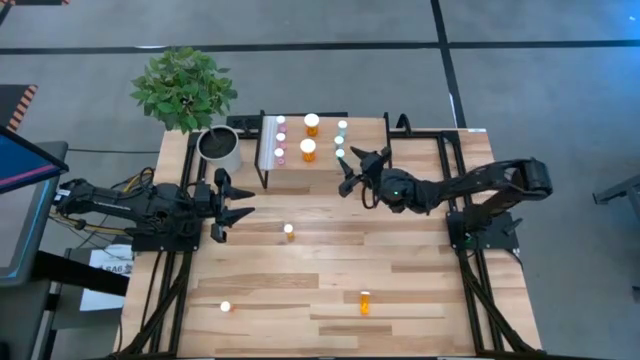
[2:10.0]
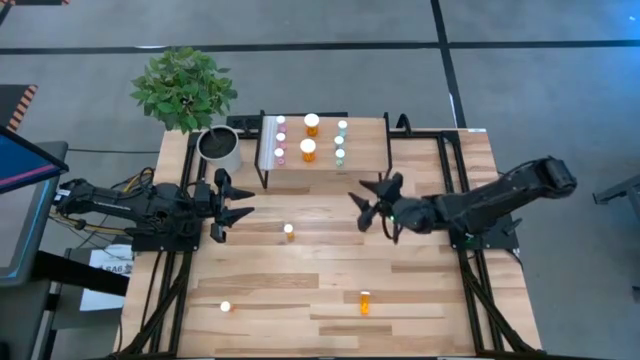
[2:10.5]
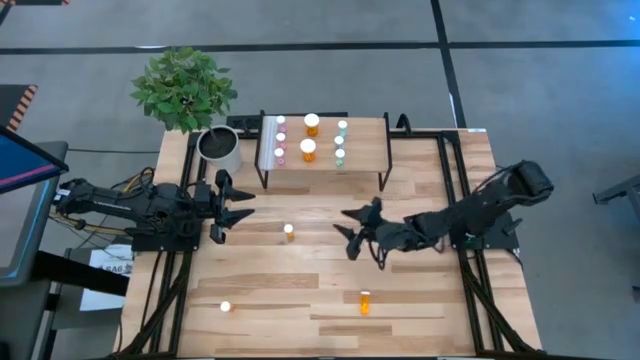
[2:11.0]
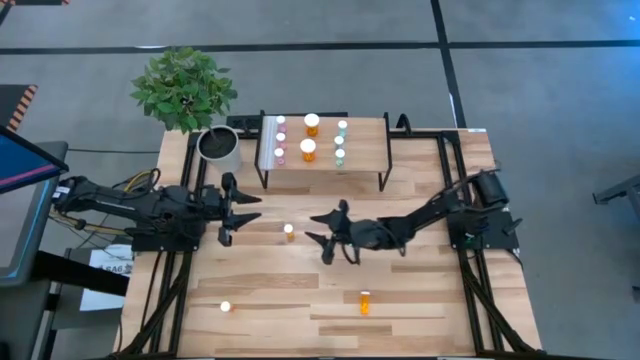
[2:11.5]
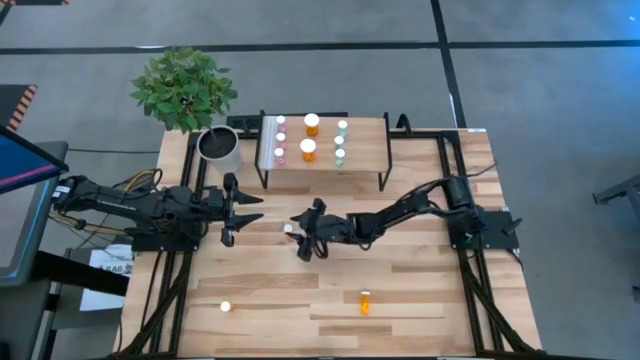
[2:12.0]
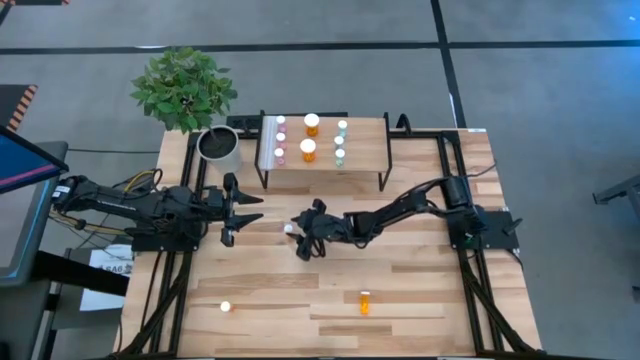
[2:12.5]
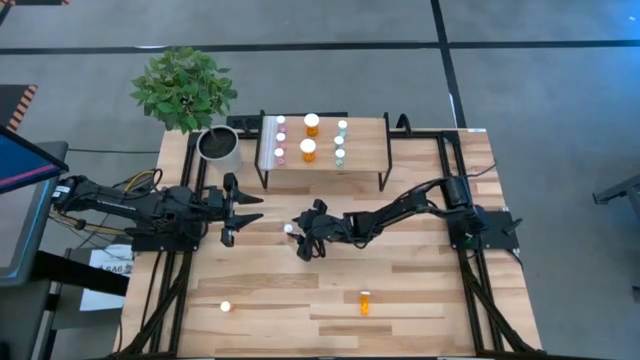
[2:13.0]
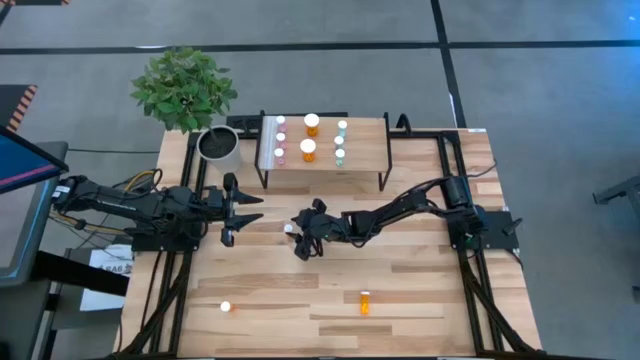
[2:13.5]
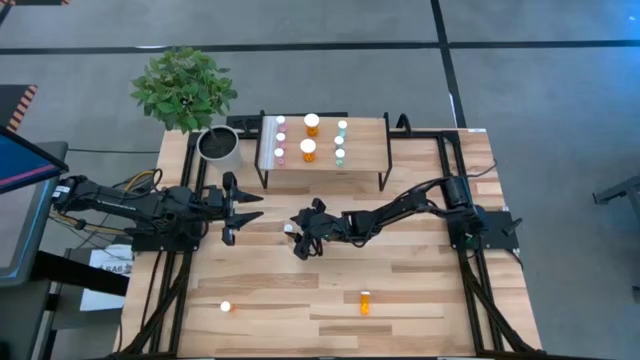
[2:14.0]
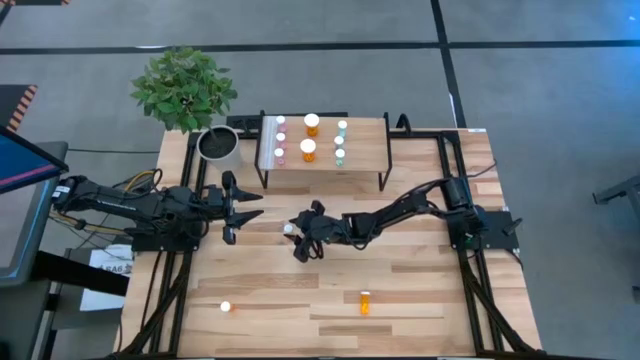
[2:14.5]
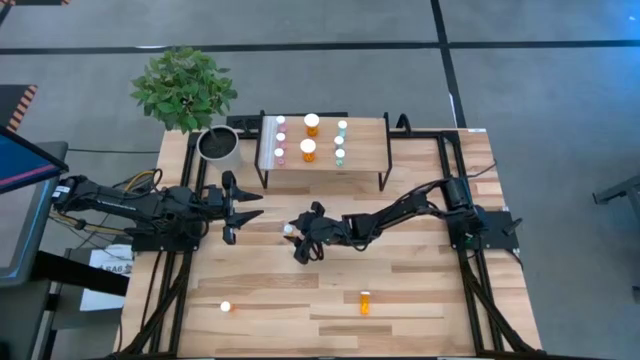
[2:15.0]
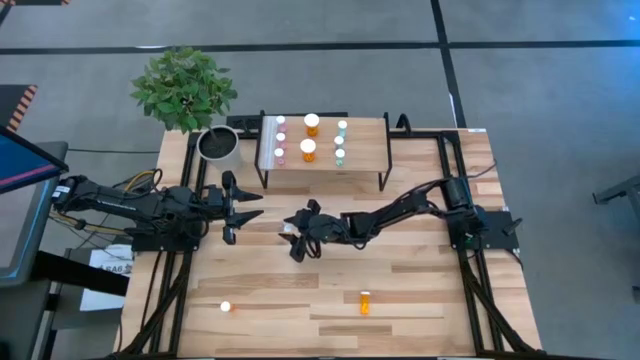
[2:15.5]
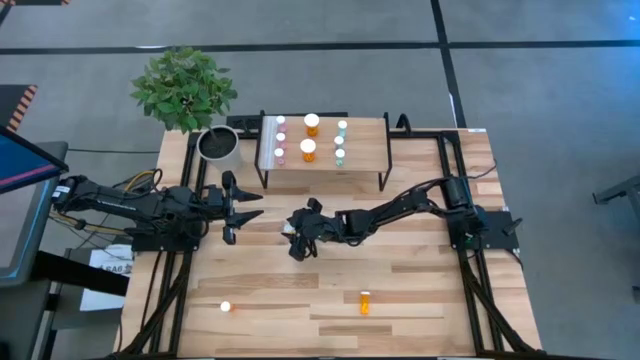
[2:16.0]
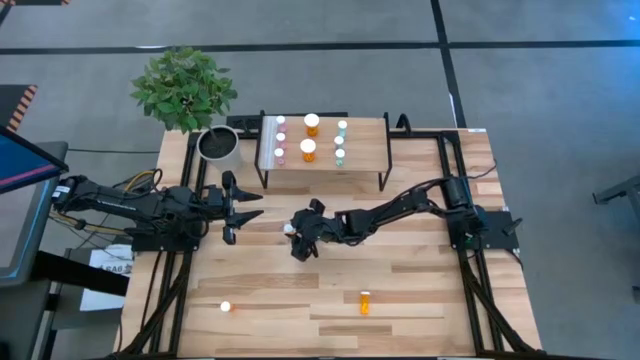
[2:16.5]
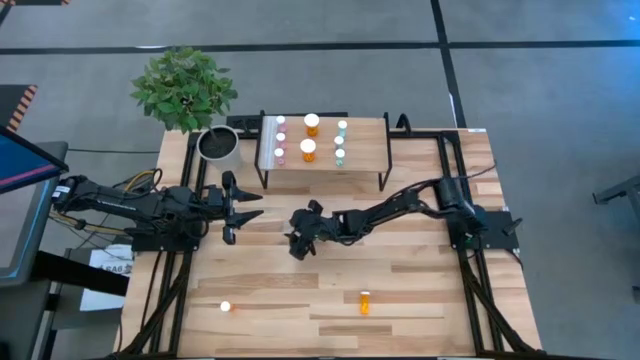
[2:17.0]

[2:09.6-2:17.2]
Task: Pick and place medicine bottles onto shelf by color
Put the top small orange pill bottle on the shelf

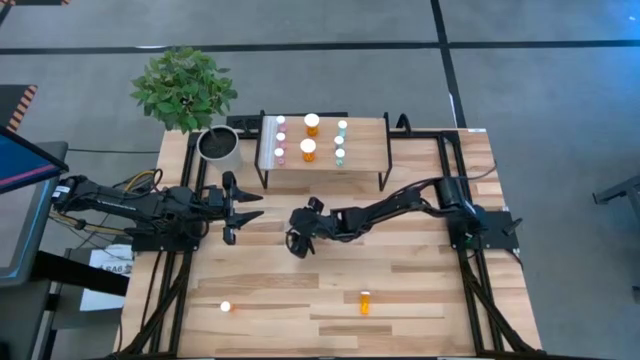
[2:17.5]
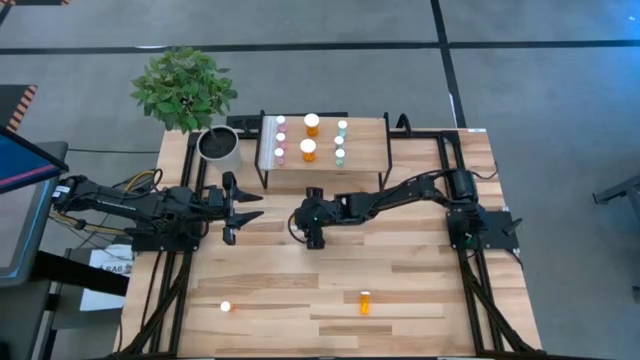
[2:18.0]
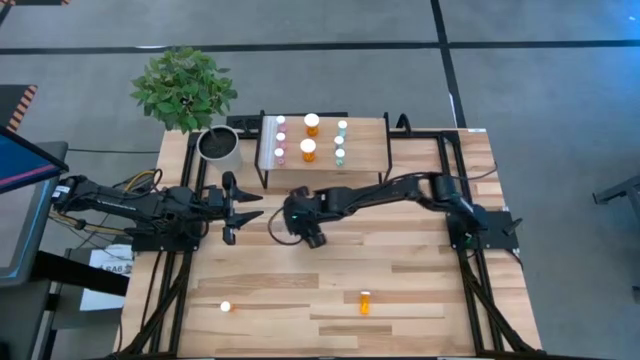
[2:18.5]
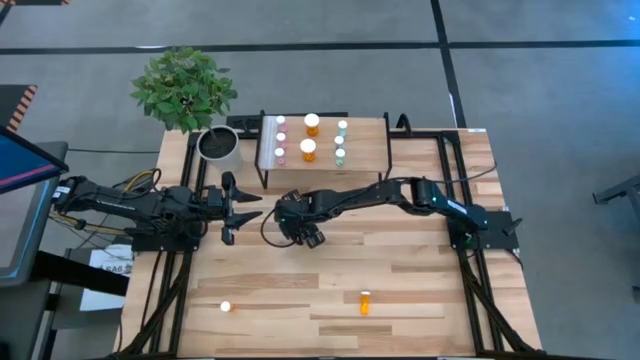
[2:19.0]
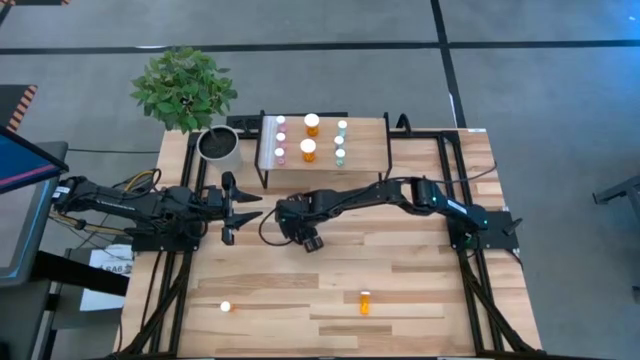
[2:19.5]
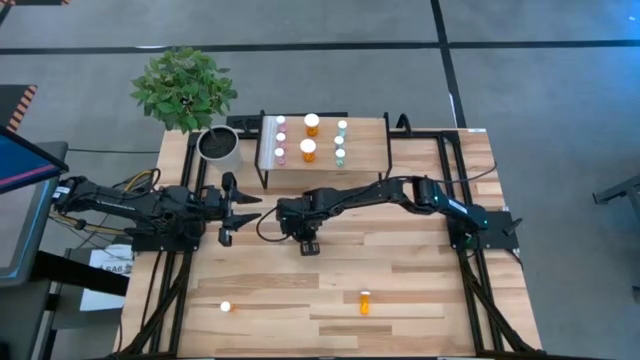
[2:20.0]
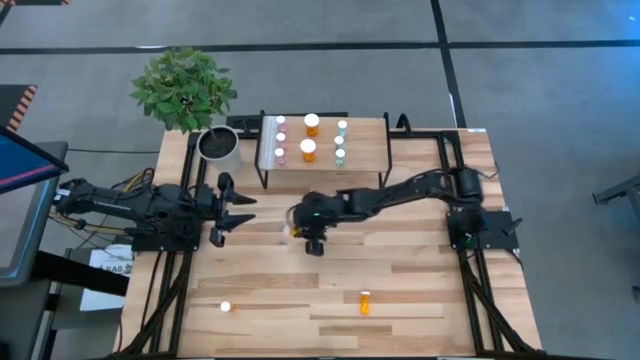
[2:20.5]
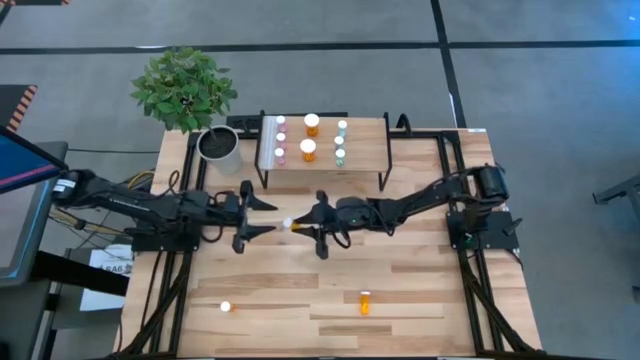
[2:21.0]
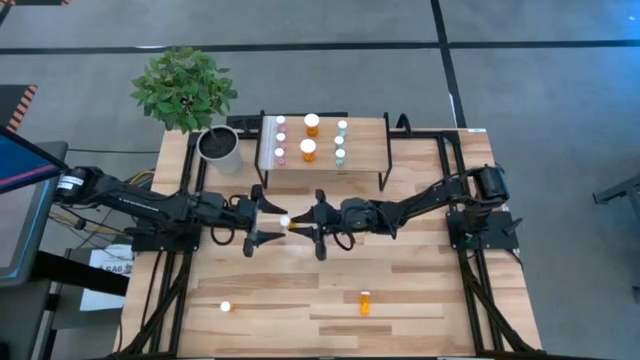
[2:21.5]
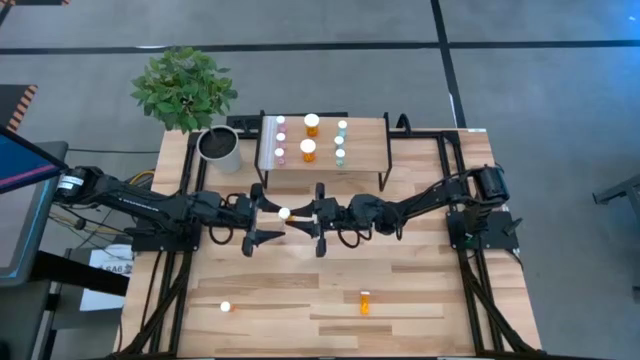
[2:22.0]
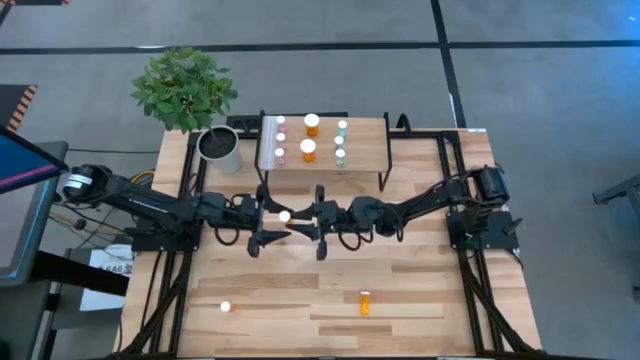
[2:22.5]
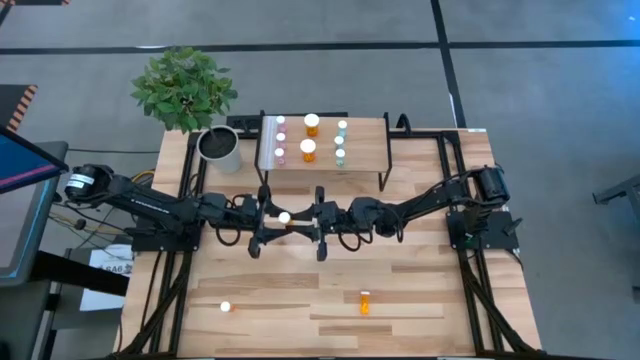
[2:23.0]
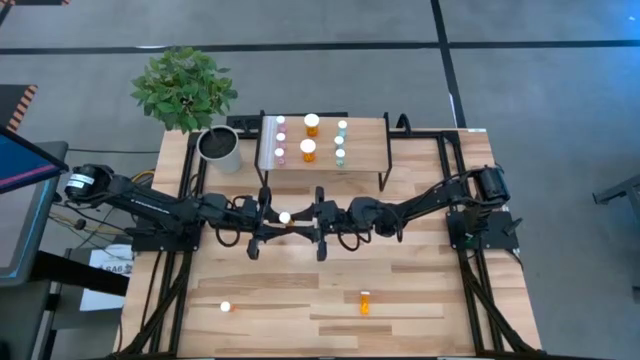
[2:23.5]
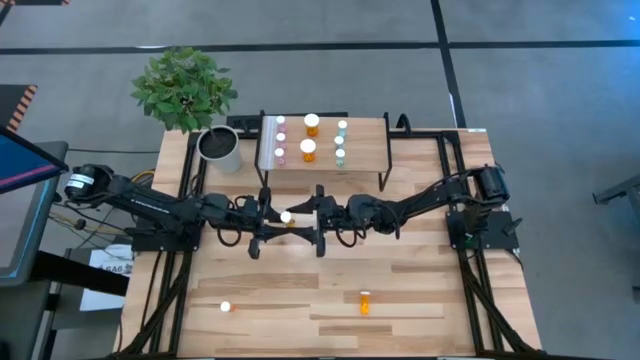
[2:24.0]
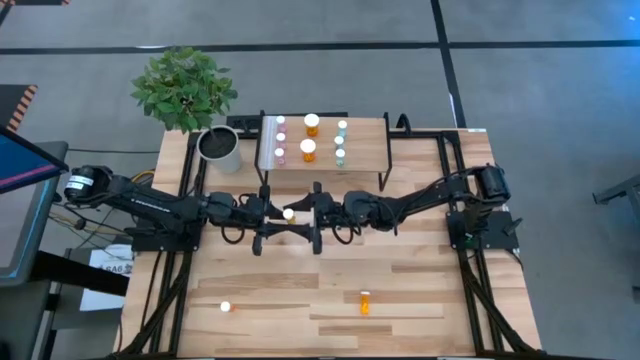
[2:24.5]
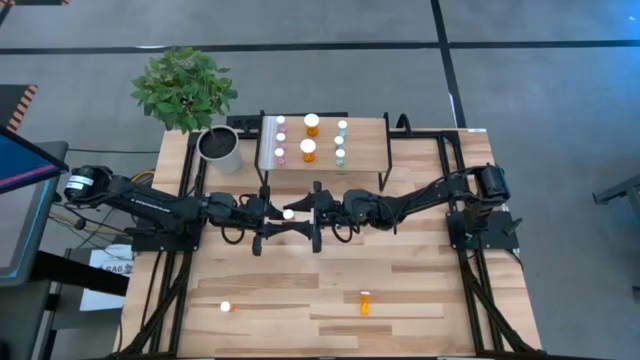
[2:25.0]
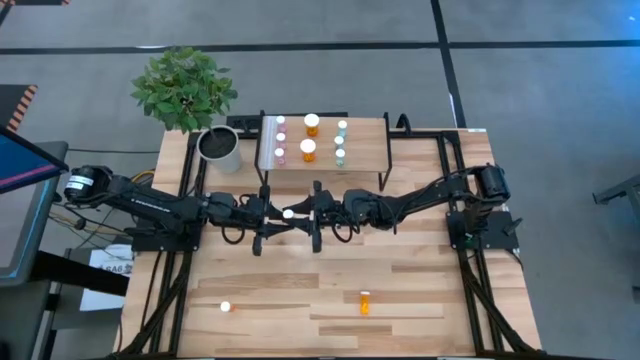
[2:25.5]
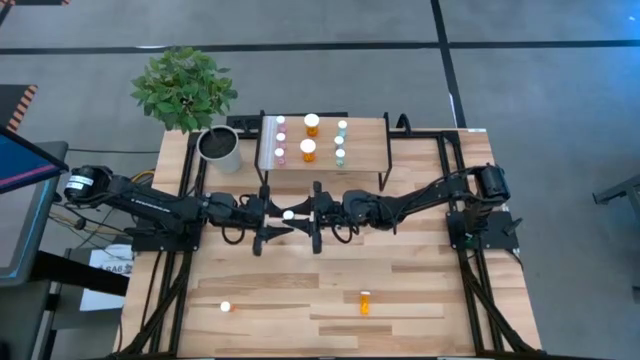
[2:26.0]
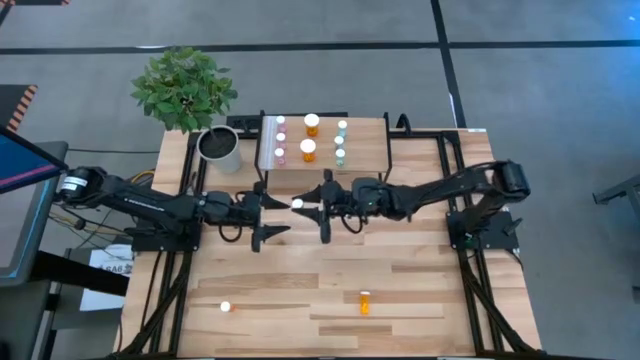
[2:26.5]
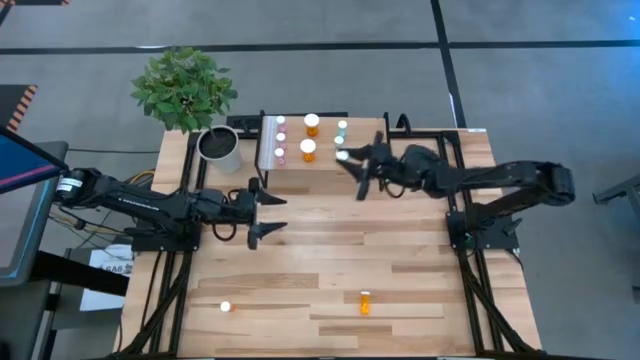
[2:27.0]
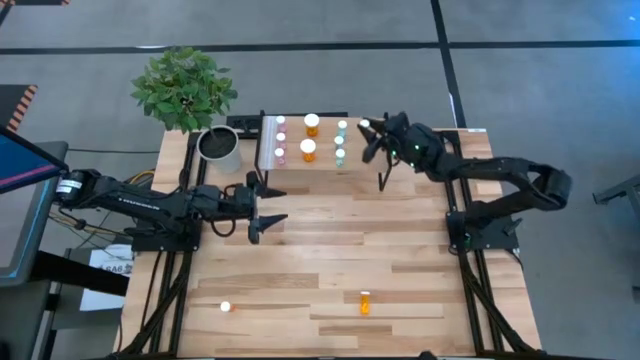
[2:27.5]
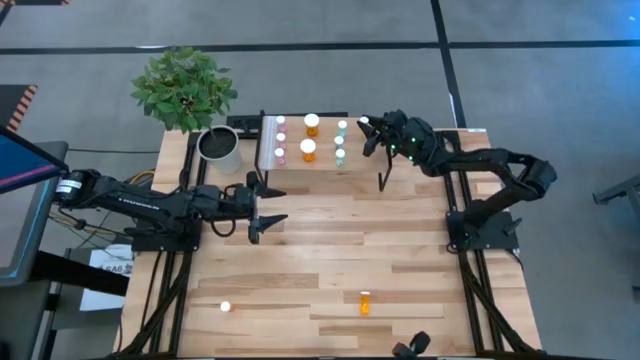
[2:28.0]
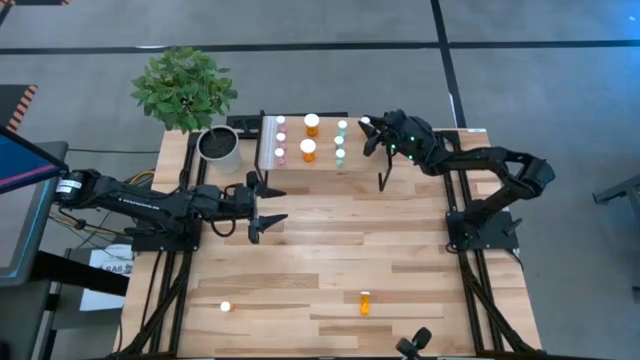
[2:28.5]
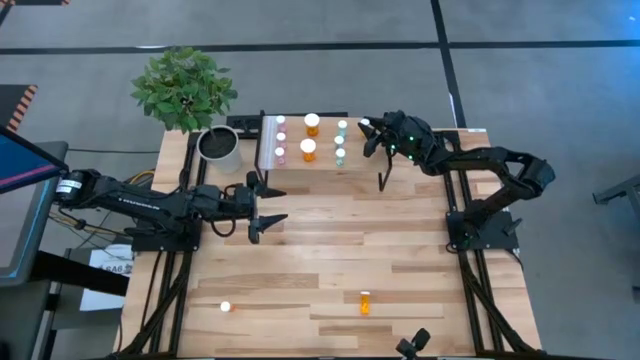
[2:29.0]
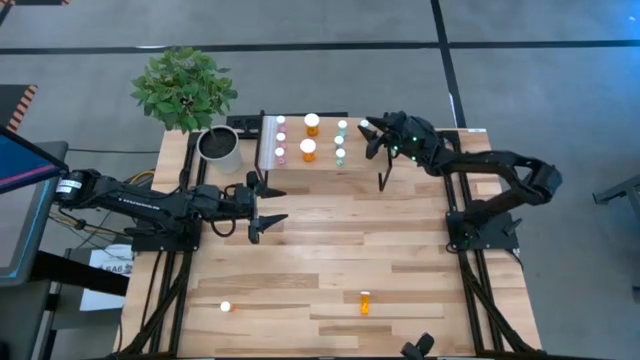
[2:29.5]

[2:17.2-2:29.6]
Put the top small orange pill bottle on the shelf

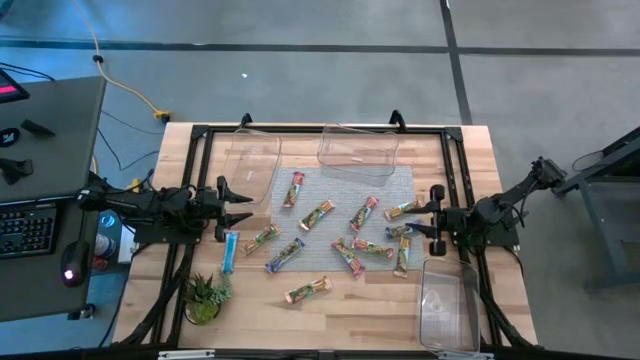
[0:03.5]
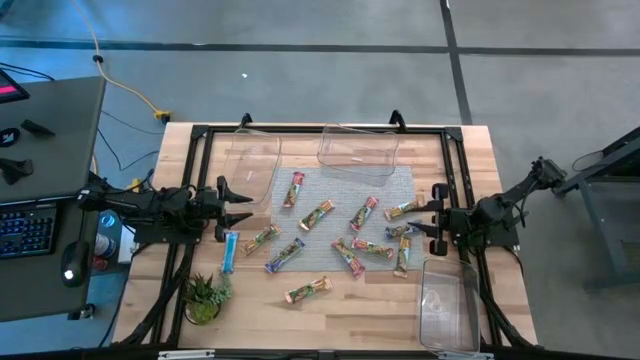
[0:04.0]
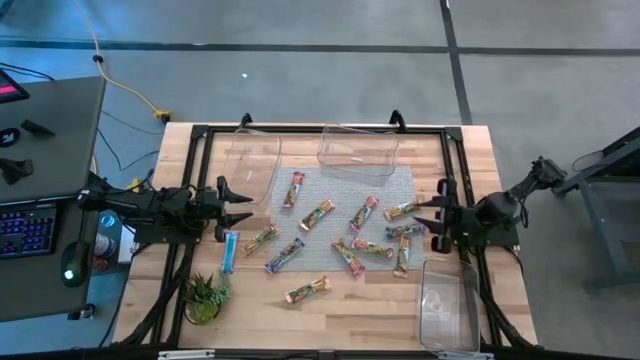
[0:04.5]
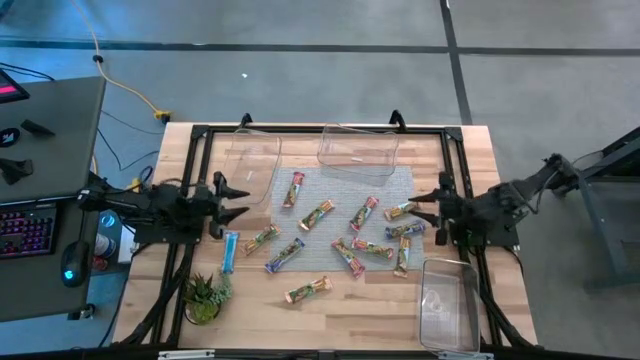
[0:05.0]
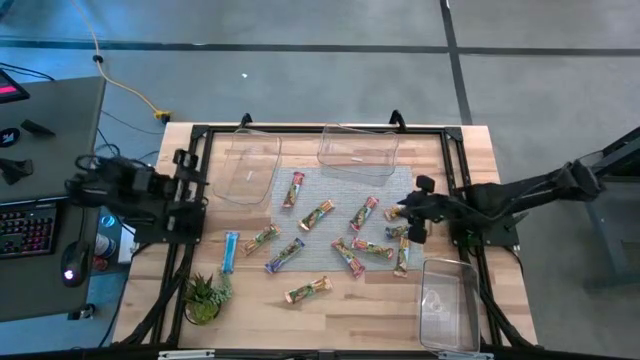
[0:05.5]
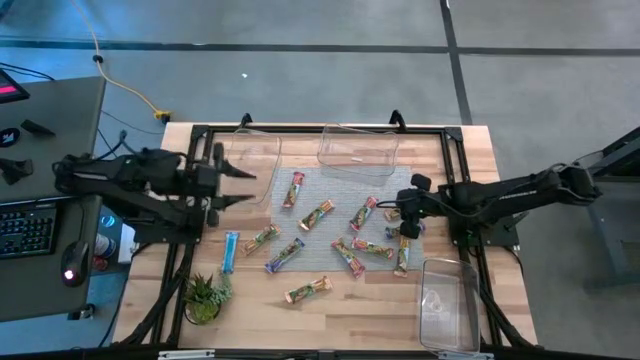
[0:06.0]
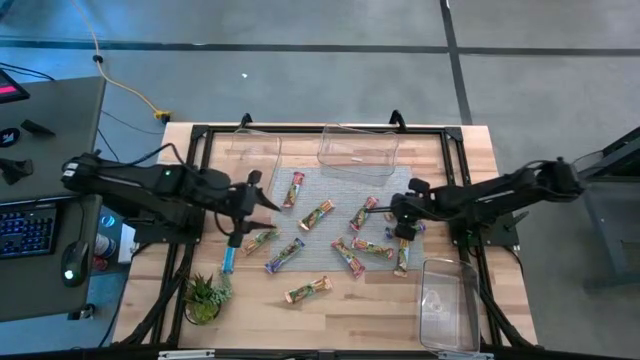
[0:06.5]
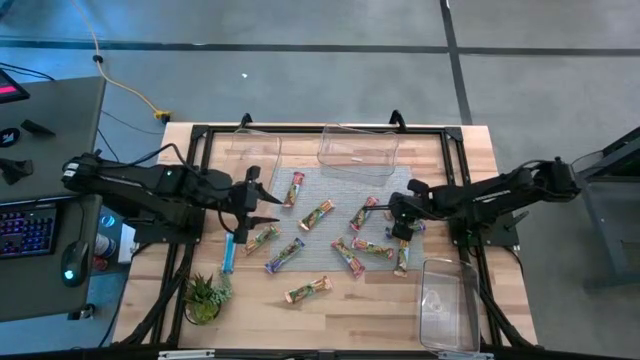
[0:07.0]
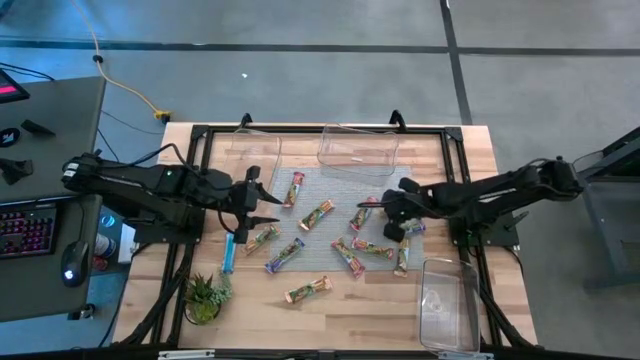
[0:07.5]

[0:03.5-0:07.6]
Task: Pick and place Granola Bars by type
Put the yellow granola bar into the top right transparent bin
